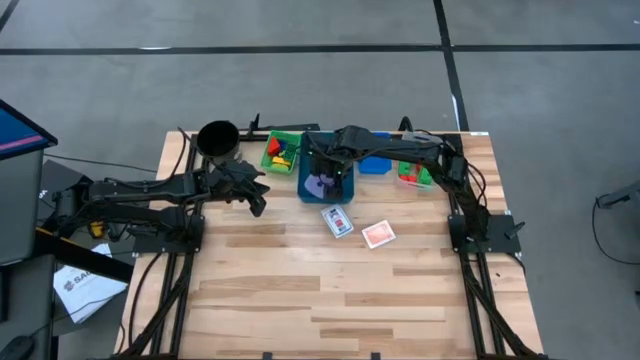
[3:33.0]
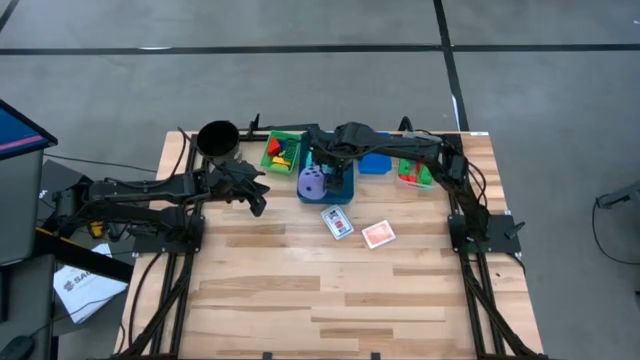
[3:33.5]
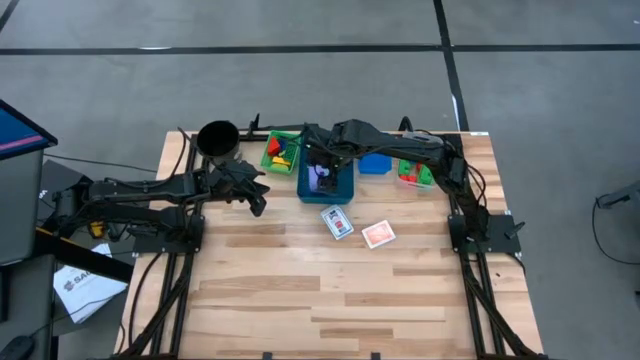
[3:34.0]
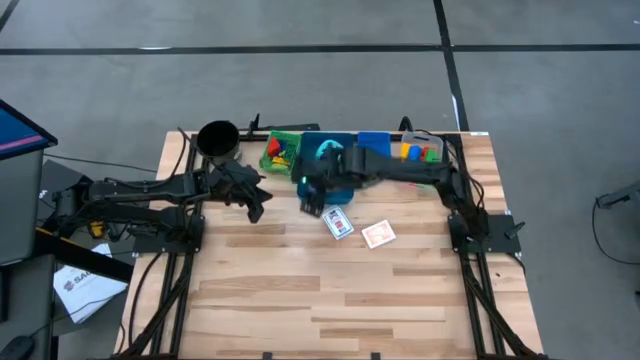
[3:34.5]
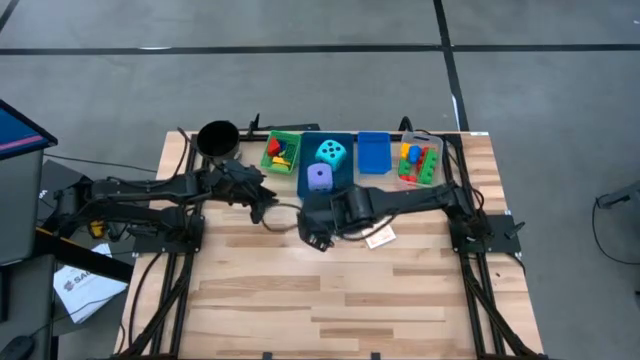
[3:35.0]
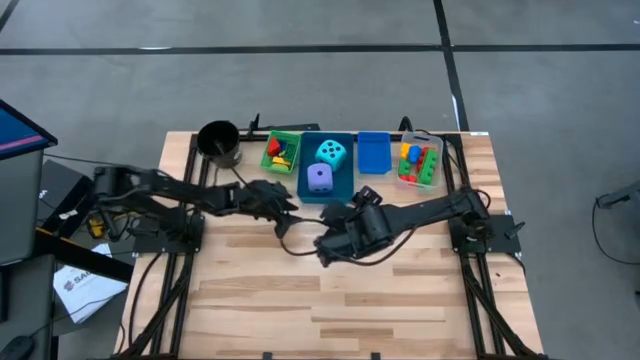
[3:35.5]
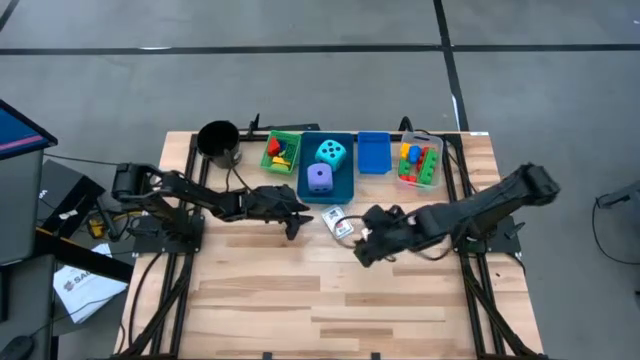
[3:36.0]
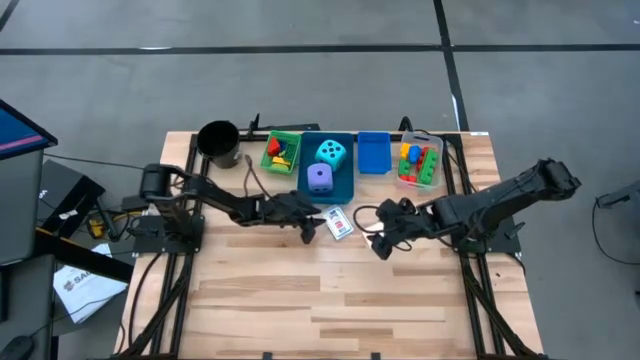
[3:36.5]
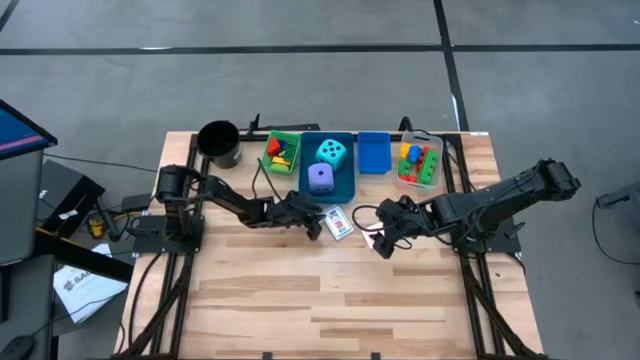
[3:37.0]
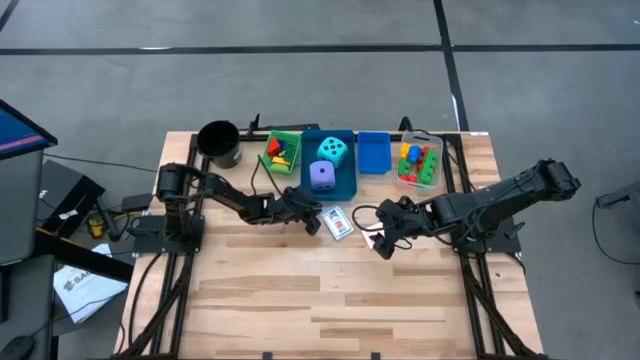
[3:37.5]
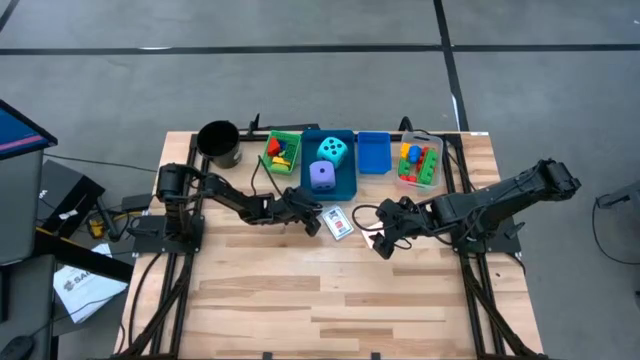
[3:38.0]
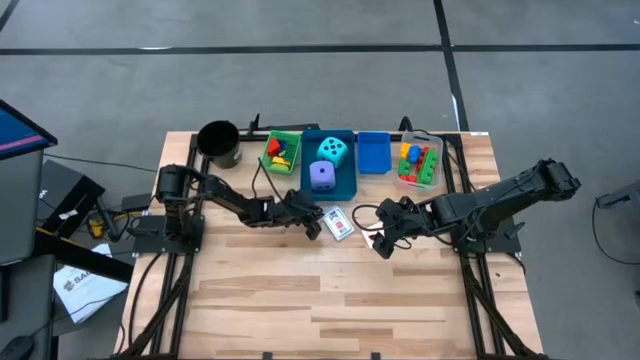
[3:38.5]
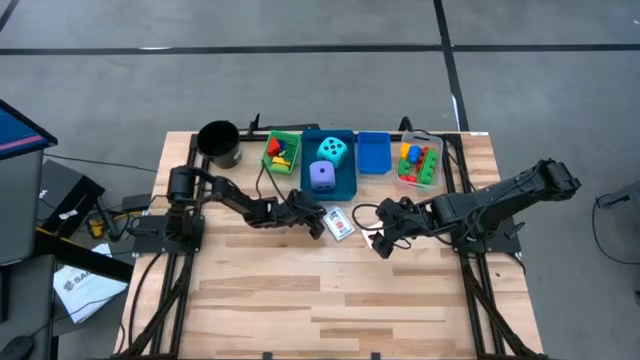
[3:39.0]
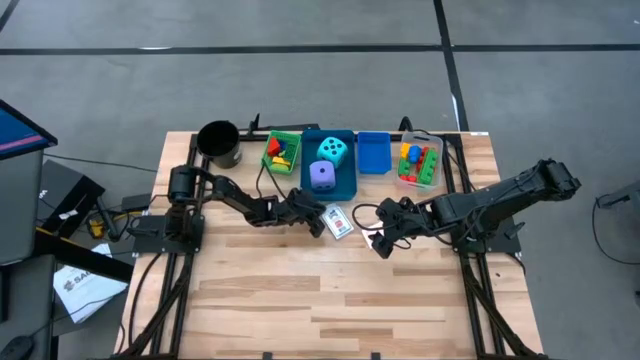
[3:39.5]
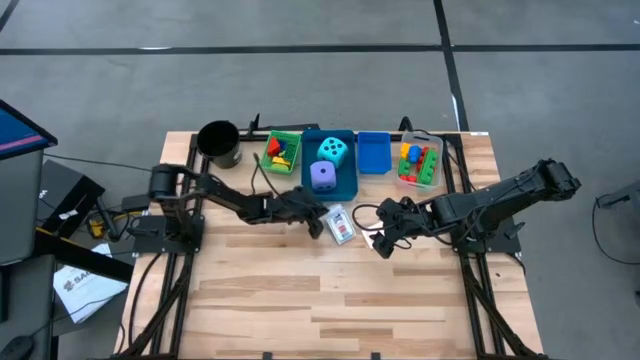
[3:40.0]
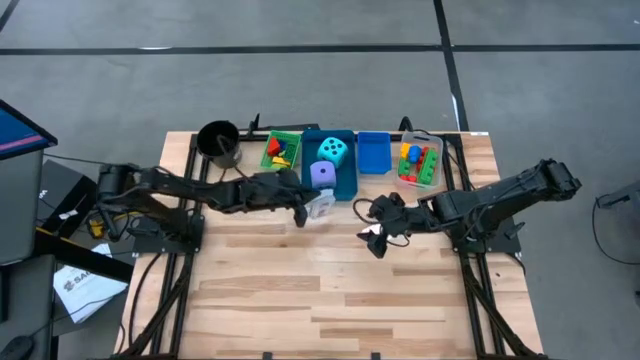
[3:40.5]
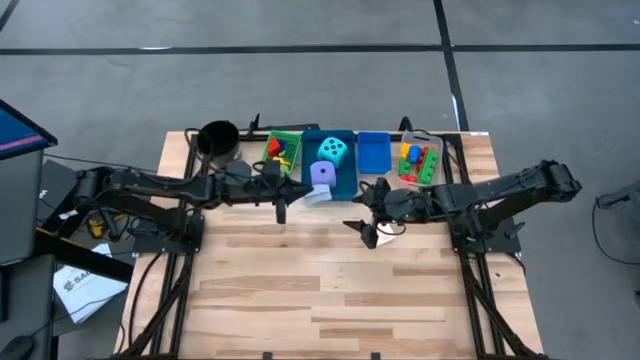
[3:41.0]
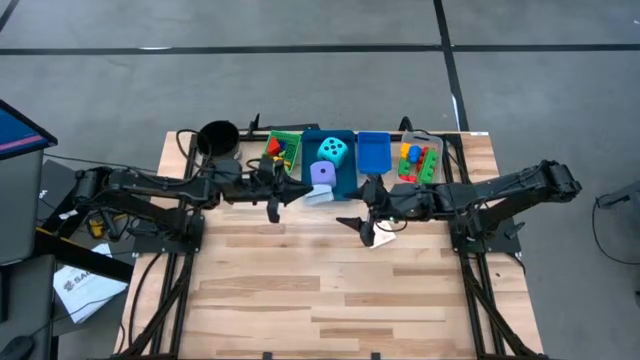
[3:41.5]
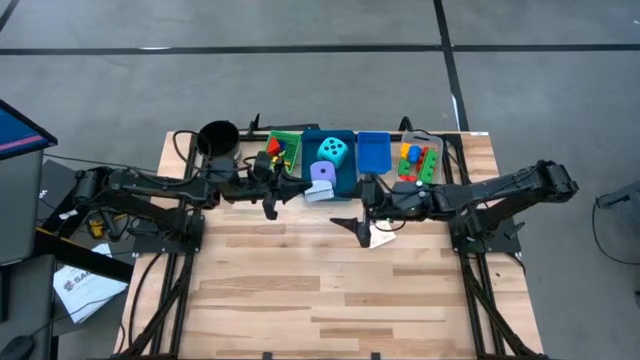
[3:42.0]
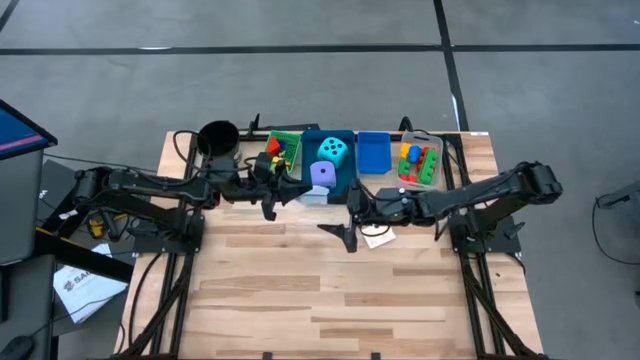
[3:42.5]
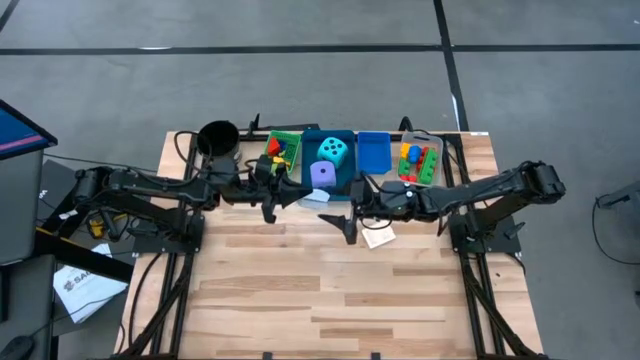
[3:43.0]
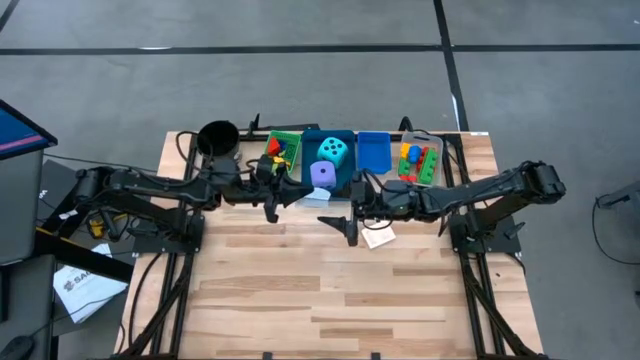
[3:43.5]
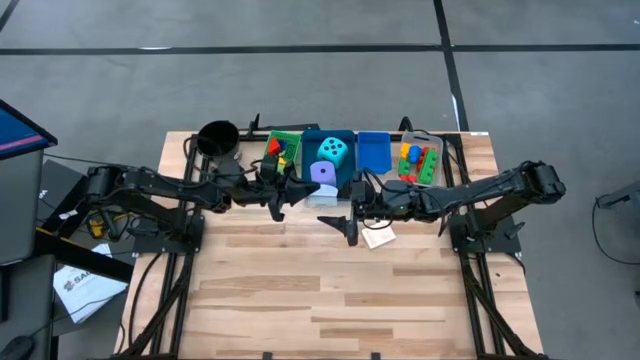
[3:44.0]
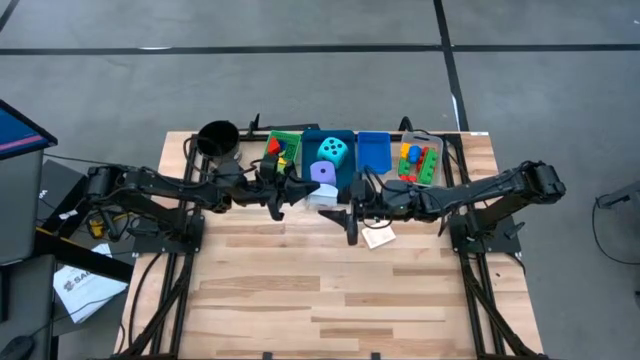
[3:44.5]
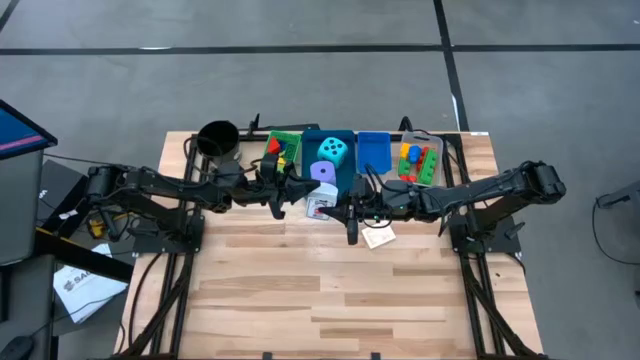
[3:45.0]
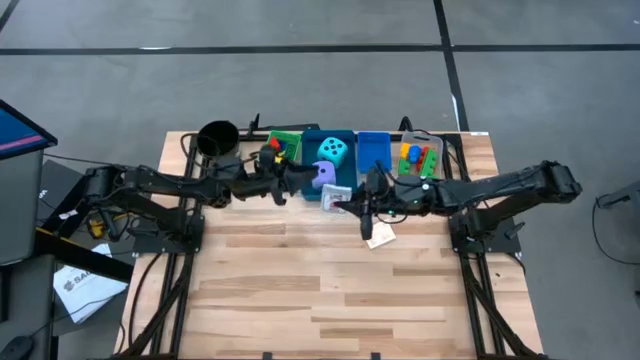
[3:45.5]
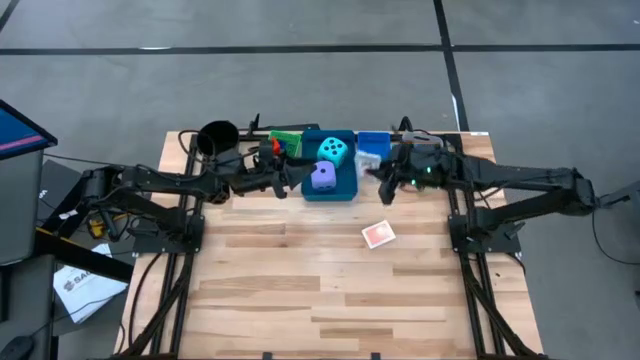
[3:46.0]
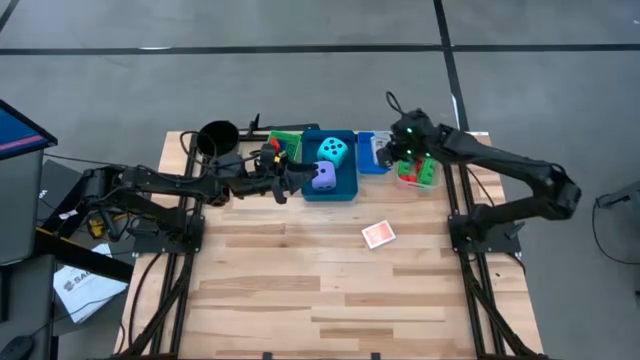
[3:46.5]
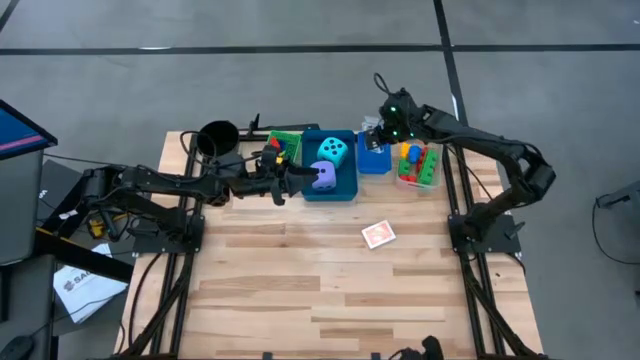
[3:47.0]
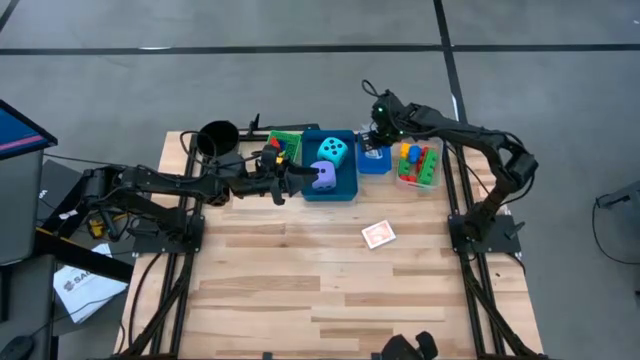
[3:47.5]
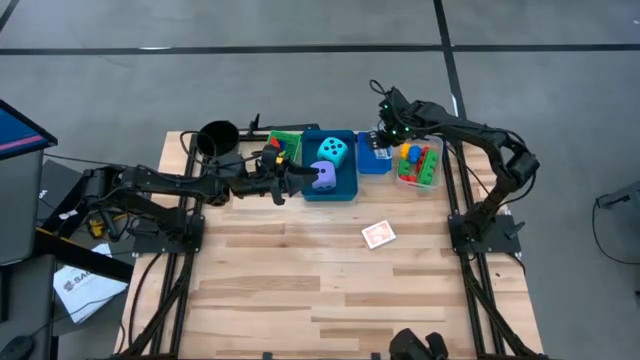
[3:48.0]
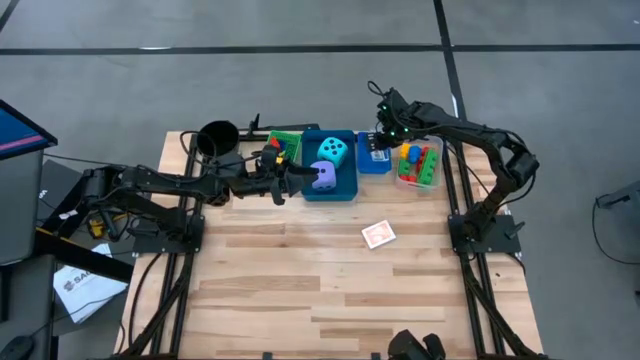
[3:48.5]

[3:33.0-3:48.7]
Task: Pick & Place Toys
Put the white playing card box into the light blue bin

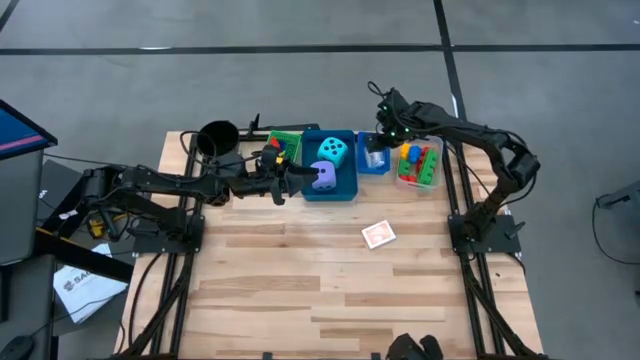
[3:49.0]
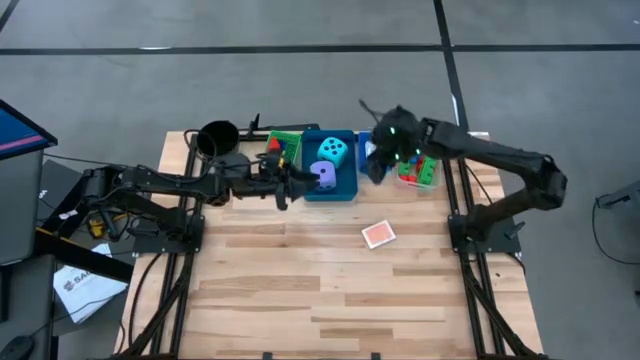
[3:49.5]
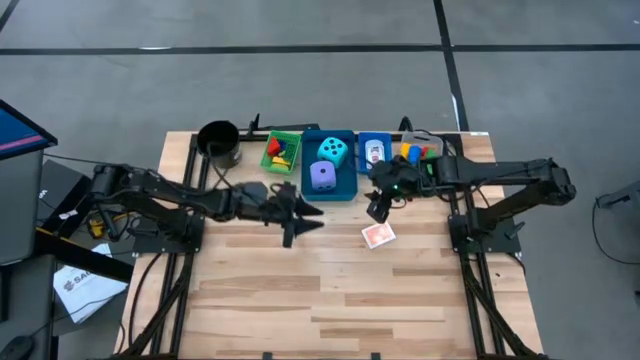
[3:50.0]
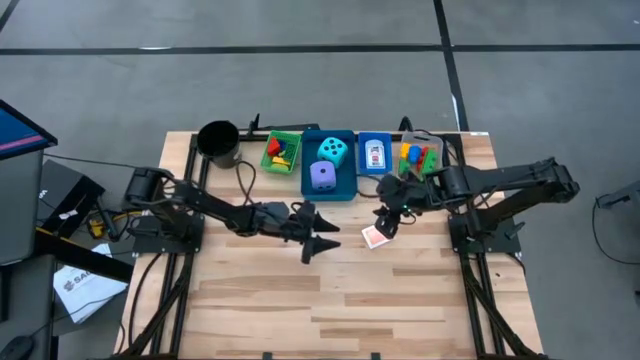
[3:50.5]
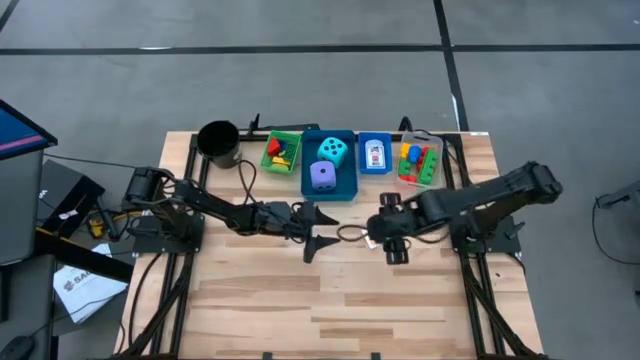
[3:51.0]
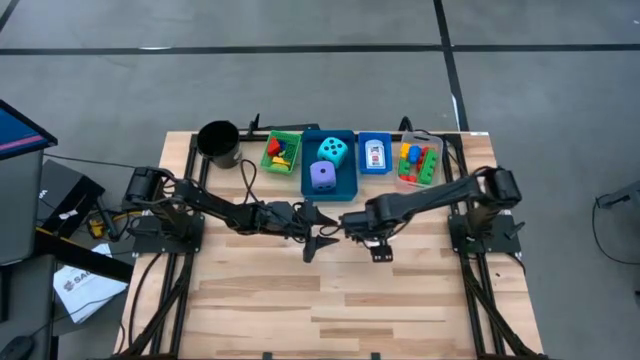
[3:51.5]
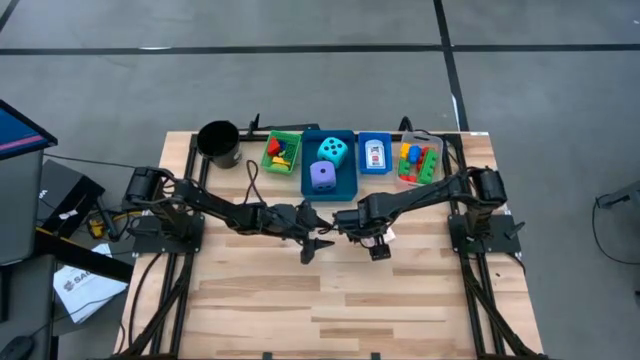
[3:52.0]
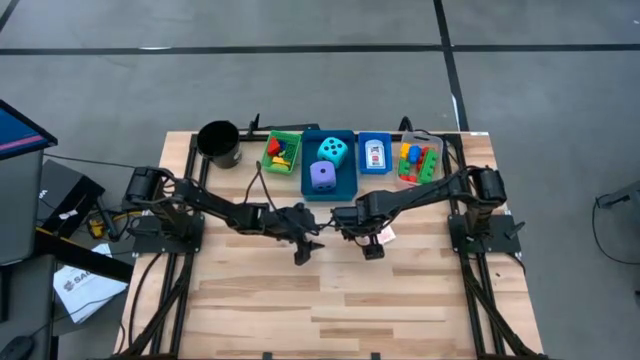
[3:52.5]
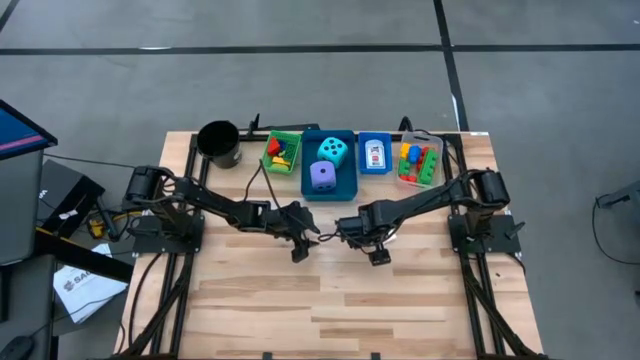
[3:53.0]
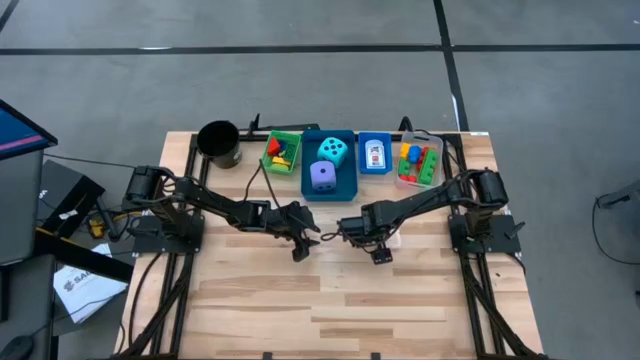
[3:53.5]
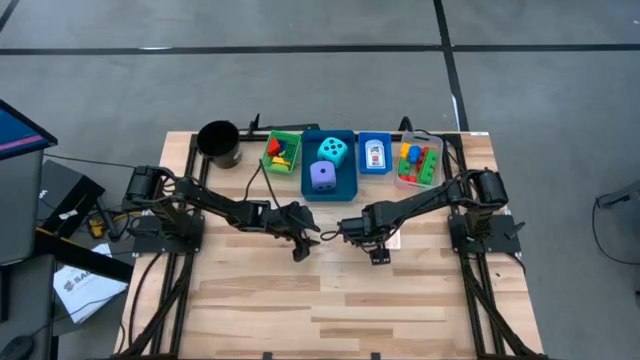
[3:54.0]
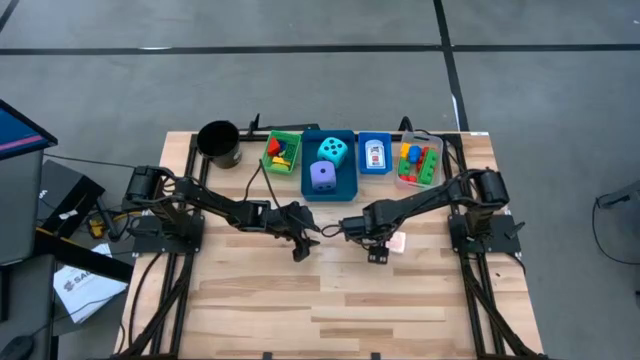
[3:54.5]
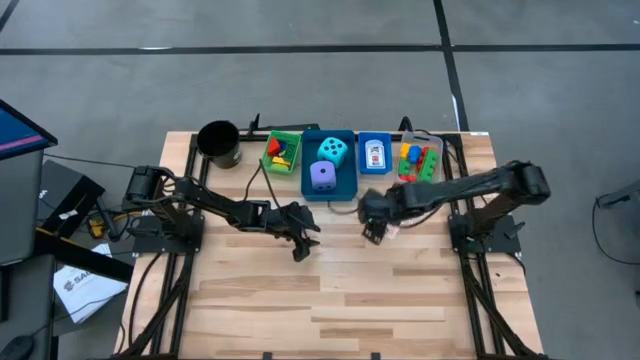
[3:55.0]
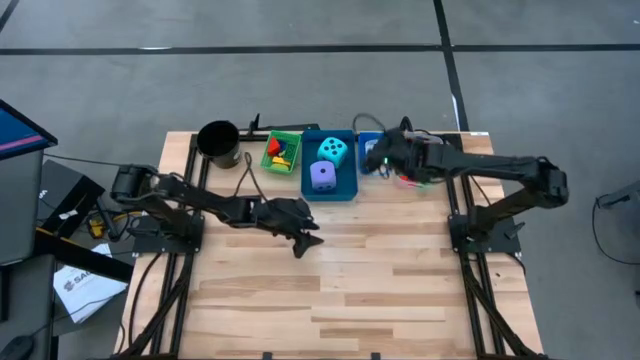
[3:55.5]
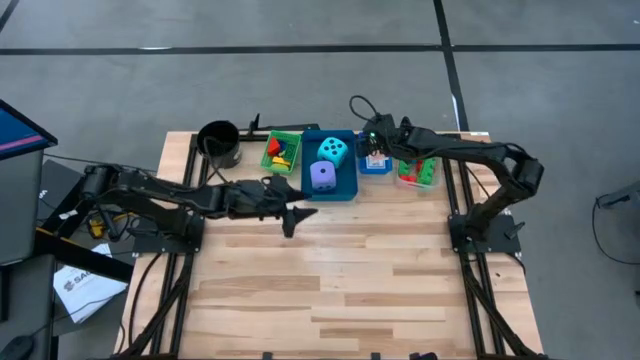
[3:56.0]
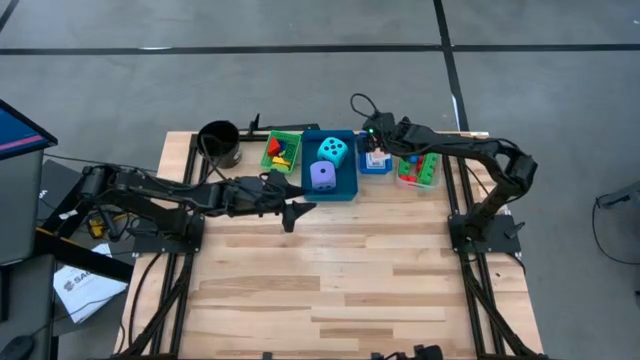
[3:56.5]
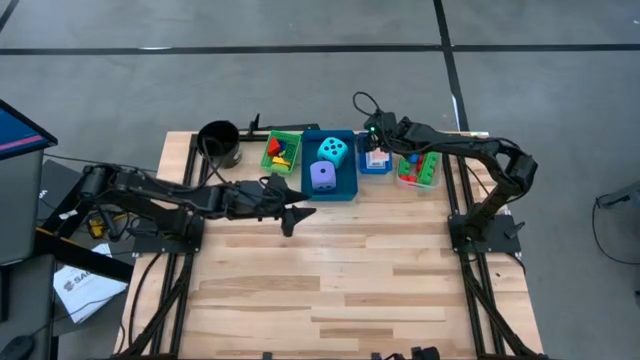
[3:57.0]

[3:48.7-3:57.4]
Put the orange playing card box into the light blue bin
